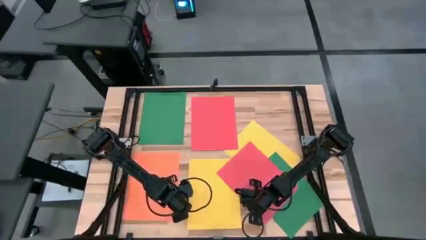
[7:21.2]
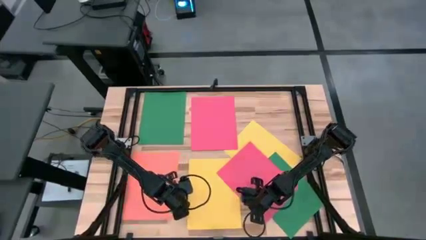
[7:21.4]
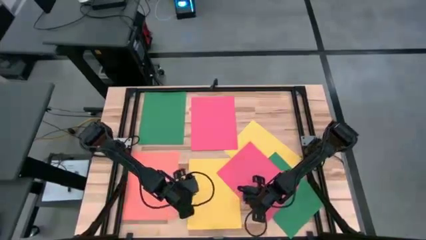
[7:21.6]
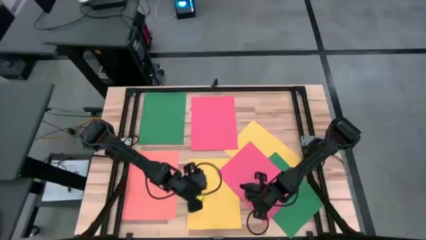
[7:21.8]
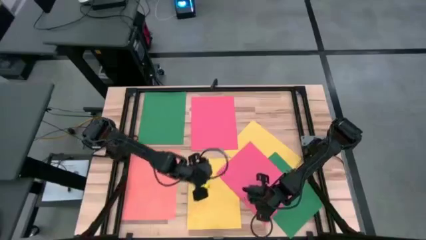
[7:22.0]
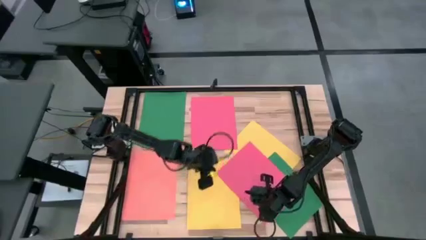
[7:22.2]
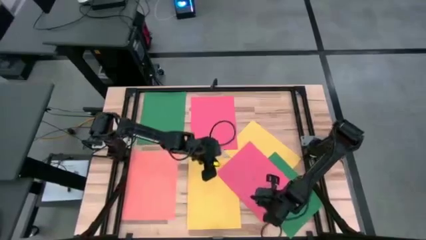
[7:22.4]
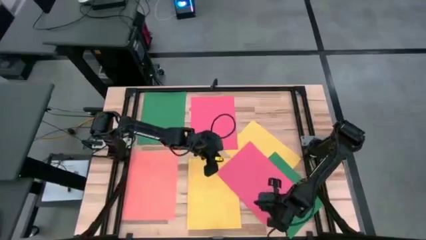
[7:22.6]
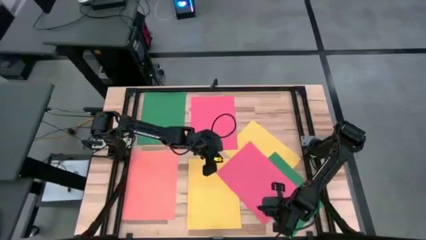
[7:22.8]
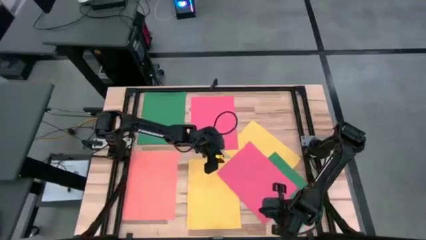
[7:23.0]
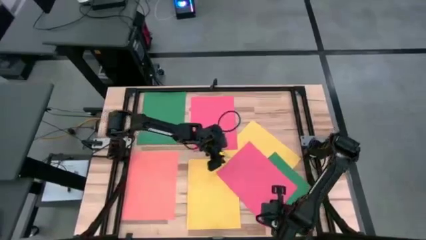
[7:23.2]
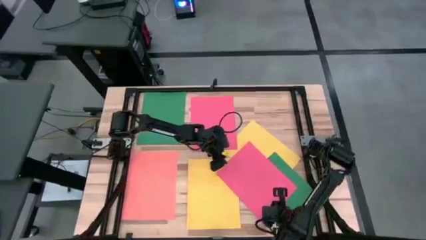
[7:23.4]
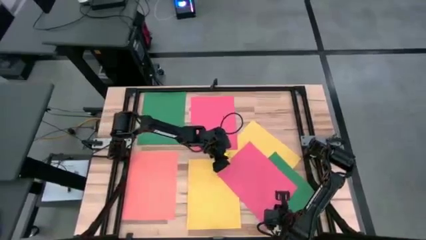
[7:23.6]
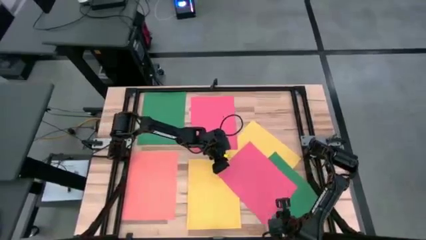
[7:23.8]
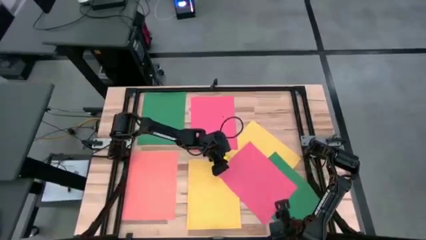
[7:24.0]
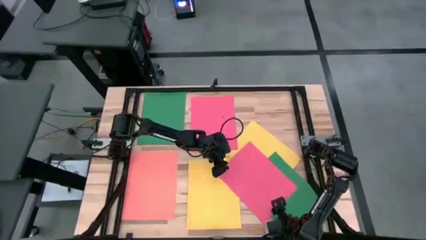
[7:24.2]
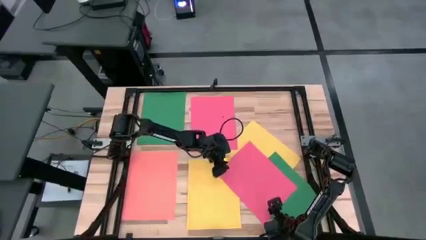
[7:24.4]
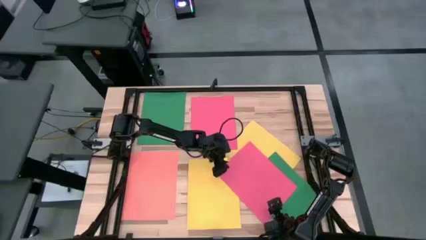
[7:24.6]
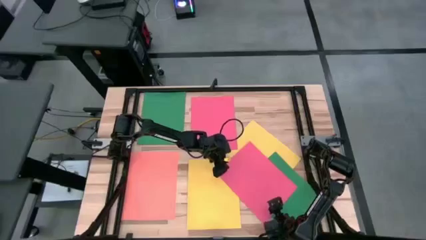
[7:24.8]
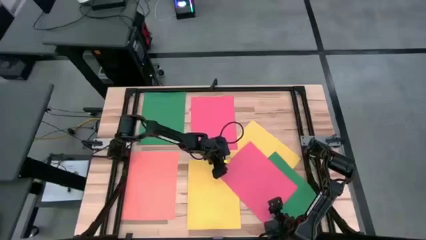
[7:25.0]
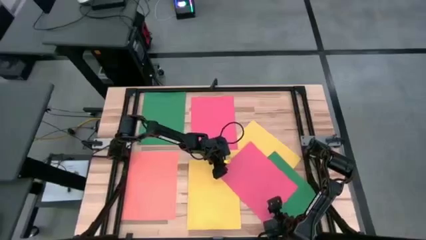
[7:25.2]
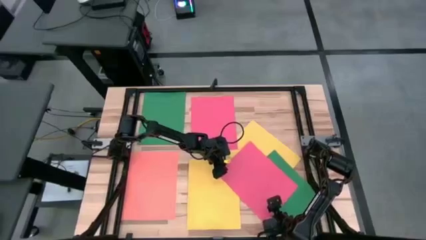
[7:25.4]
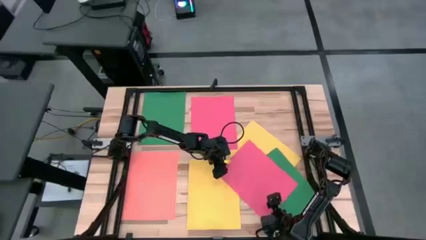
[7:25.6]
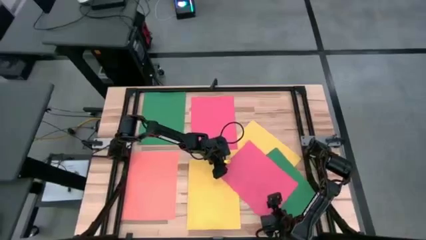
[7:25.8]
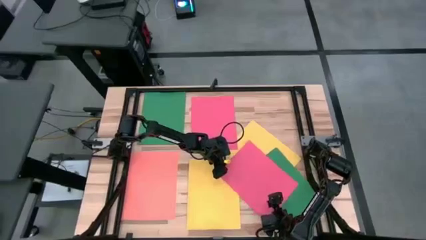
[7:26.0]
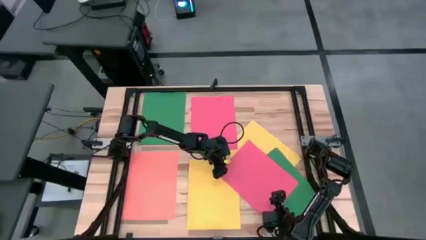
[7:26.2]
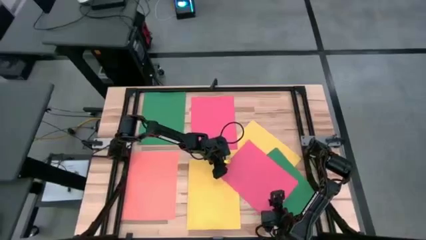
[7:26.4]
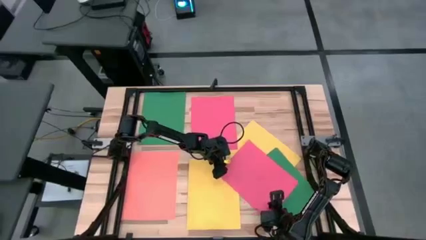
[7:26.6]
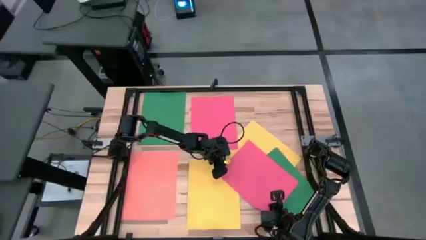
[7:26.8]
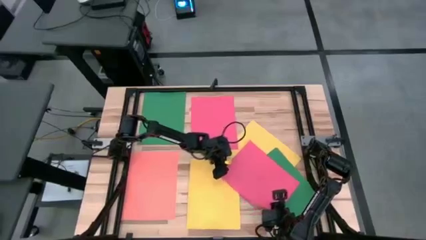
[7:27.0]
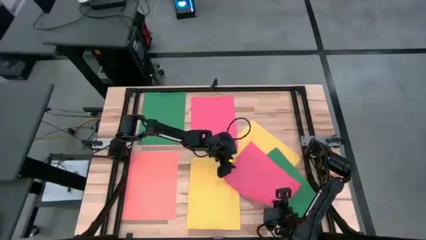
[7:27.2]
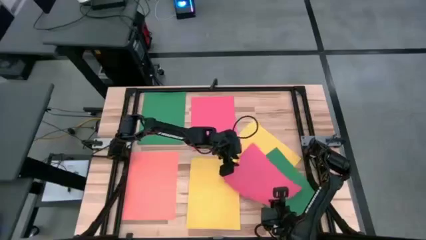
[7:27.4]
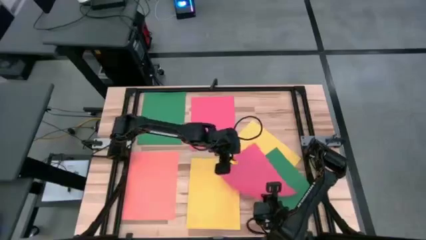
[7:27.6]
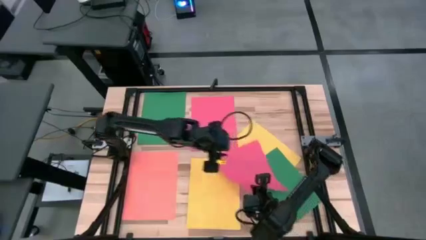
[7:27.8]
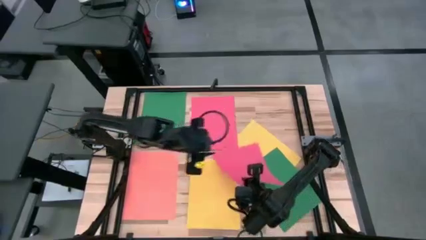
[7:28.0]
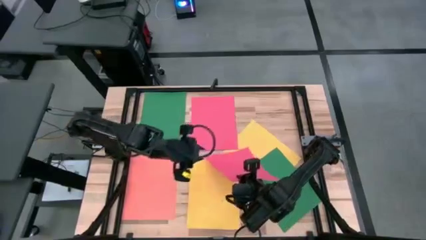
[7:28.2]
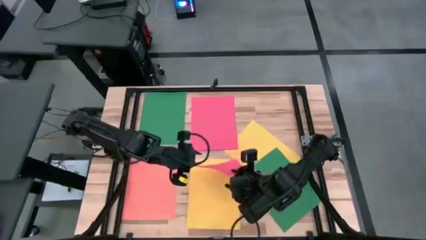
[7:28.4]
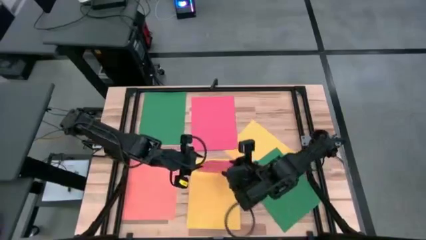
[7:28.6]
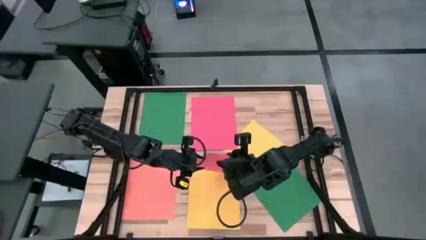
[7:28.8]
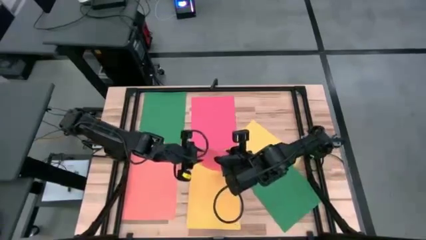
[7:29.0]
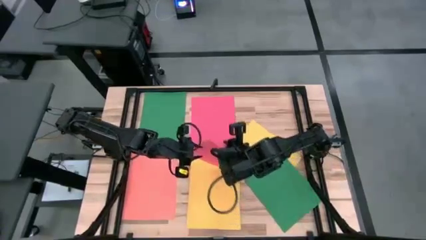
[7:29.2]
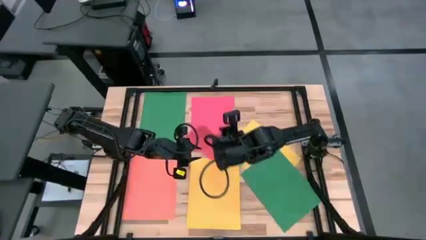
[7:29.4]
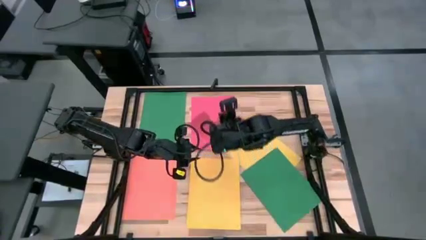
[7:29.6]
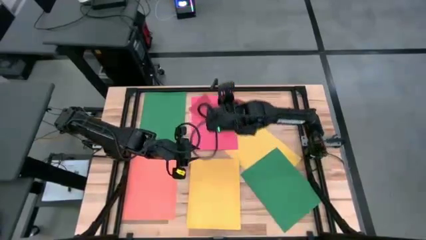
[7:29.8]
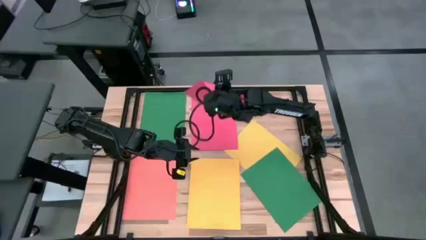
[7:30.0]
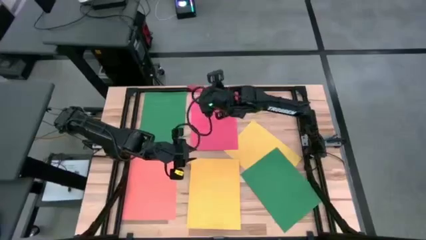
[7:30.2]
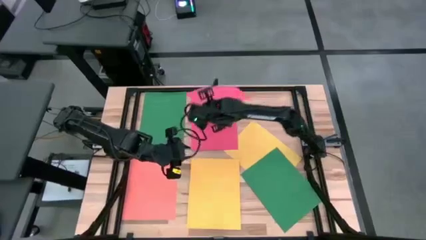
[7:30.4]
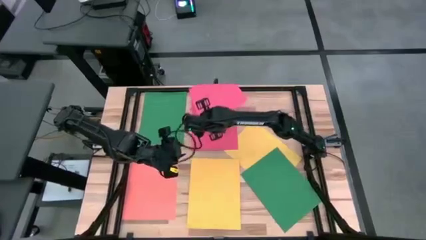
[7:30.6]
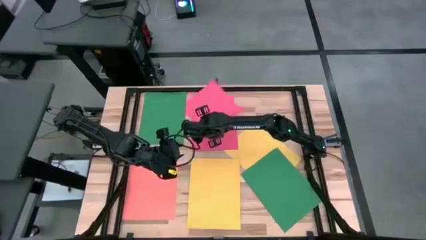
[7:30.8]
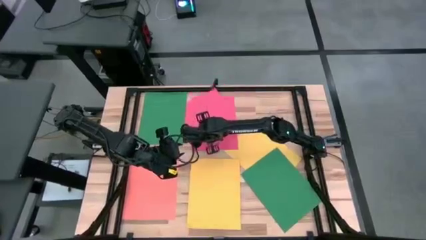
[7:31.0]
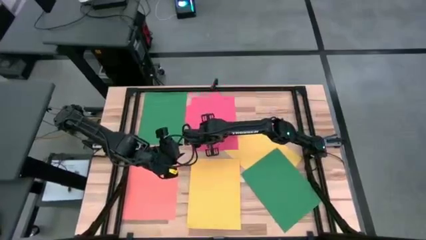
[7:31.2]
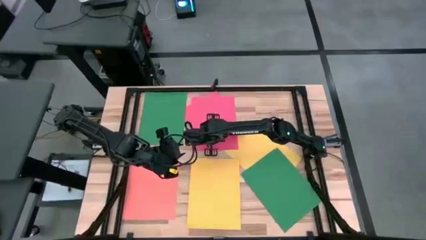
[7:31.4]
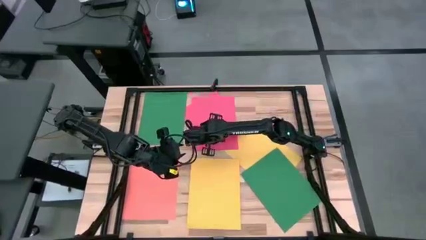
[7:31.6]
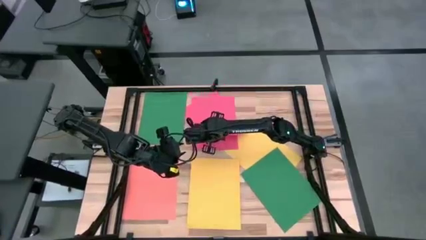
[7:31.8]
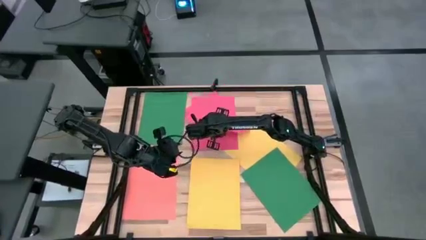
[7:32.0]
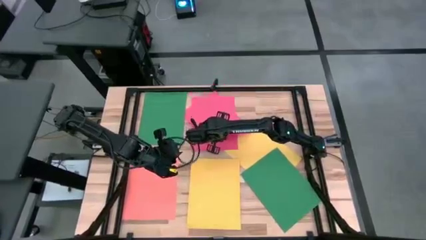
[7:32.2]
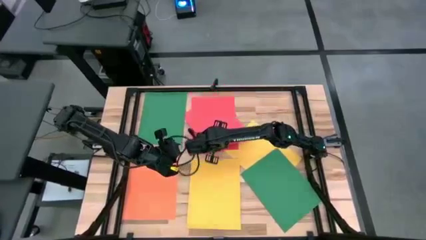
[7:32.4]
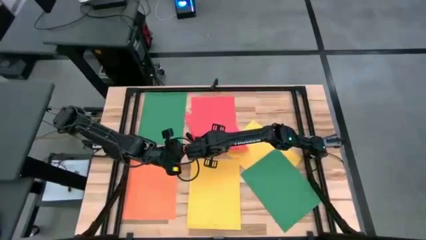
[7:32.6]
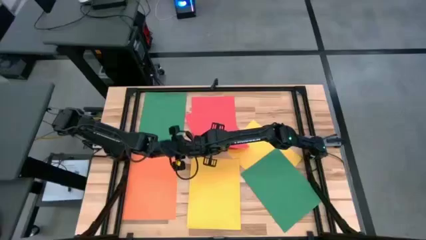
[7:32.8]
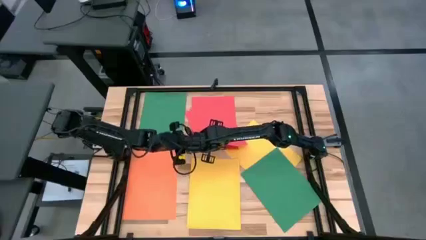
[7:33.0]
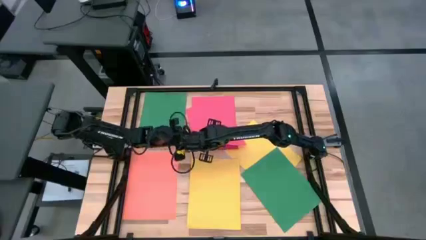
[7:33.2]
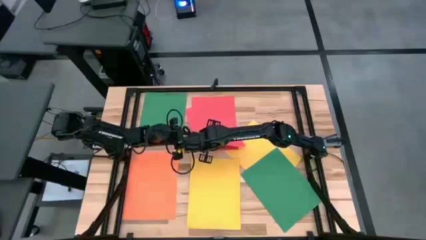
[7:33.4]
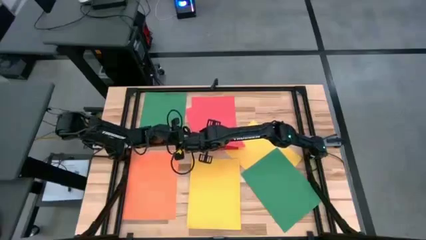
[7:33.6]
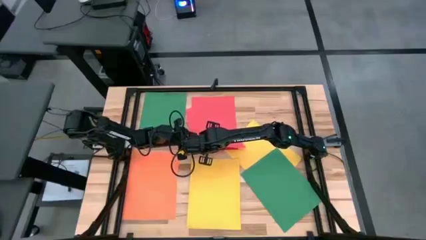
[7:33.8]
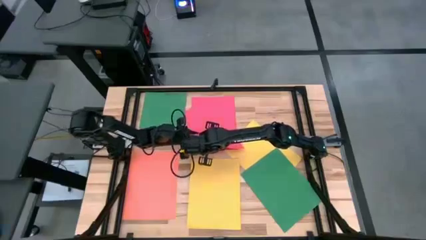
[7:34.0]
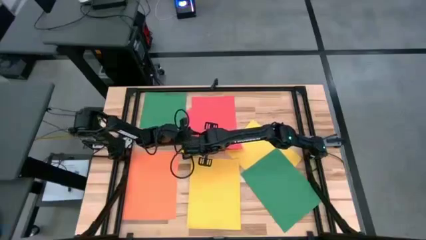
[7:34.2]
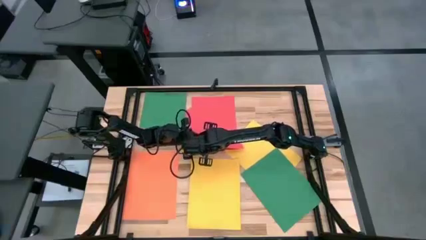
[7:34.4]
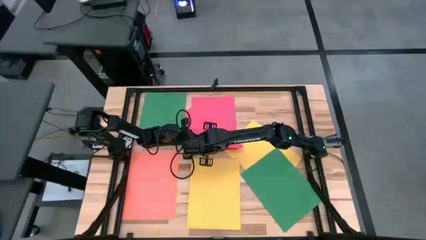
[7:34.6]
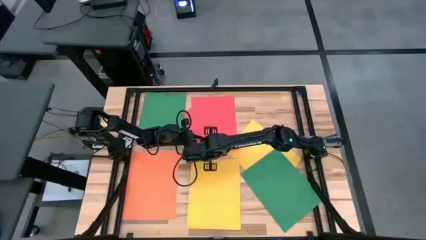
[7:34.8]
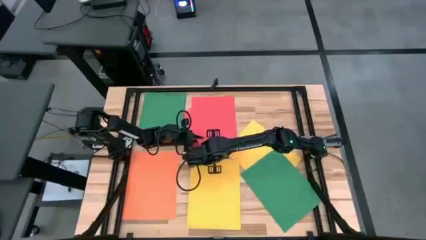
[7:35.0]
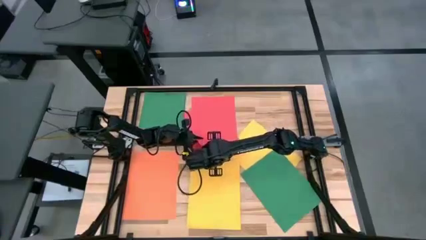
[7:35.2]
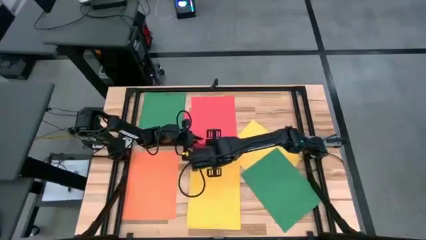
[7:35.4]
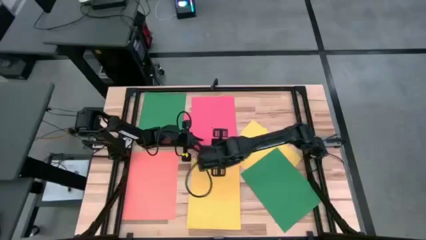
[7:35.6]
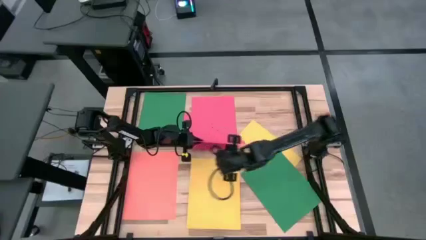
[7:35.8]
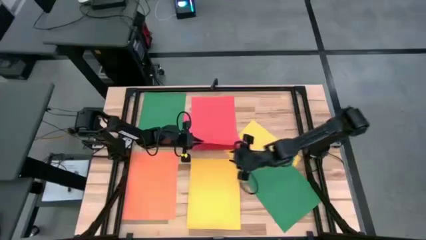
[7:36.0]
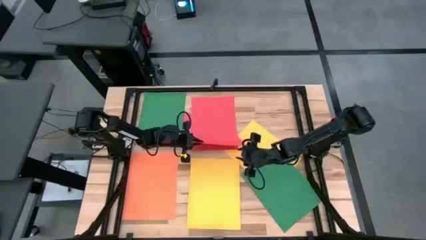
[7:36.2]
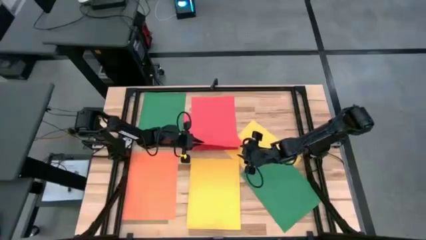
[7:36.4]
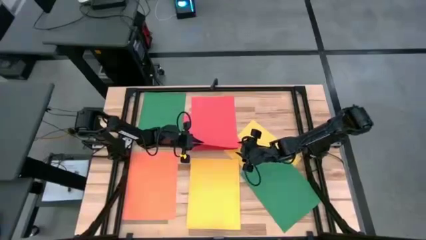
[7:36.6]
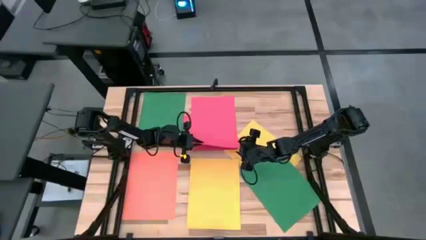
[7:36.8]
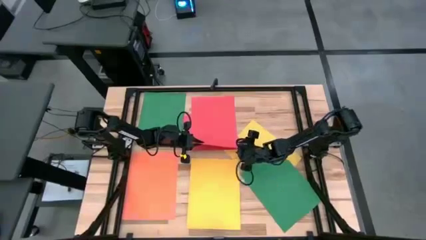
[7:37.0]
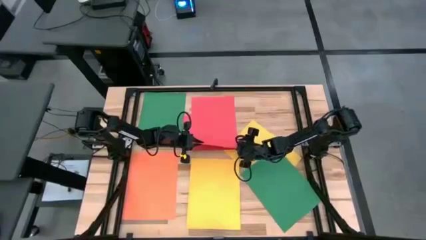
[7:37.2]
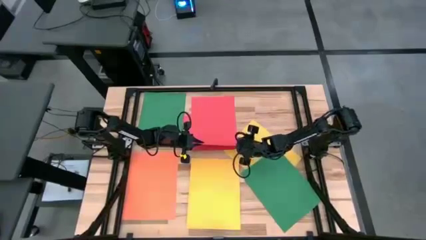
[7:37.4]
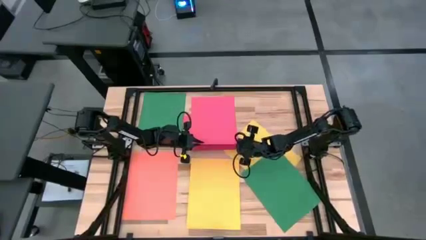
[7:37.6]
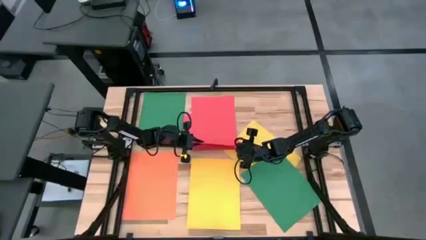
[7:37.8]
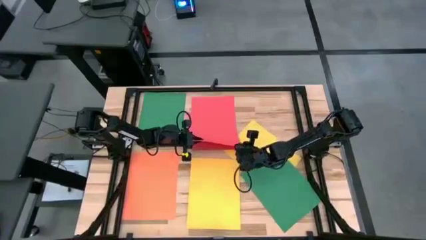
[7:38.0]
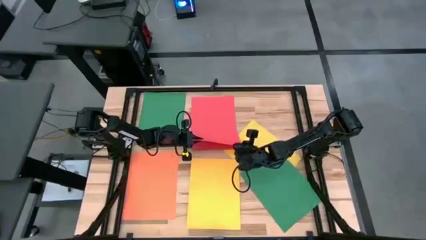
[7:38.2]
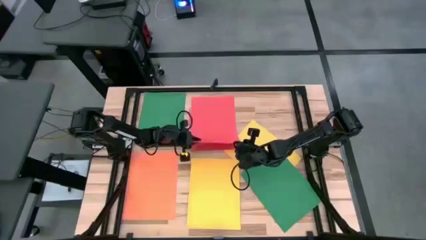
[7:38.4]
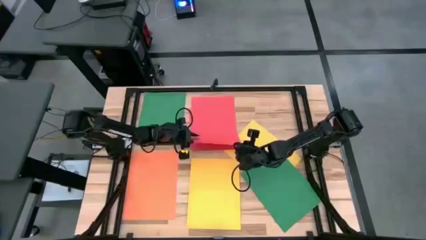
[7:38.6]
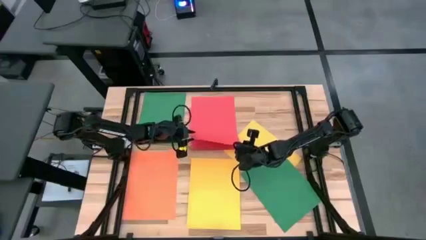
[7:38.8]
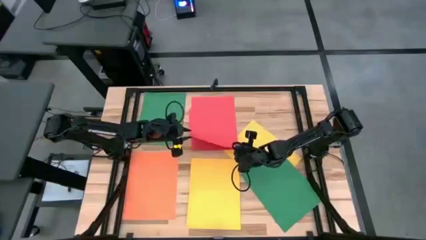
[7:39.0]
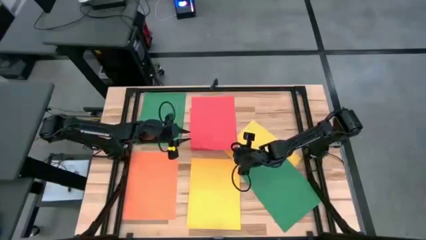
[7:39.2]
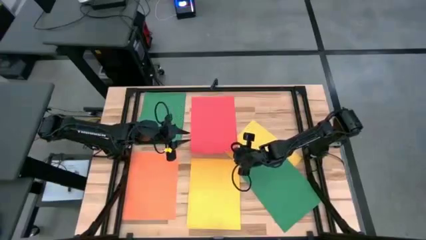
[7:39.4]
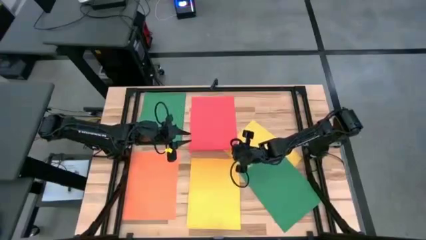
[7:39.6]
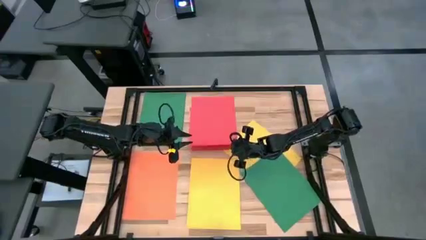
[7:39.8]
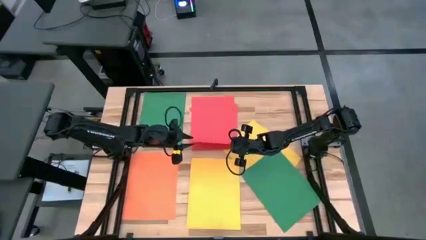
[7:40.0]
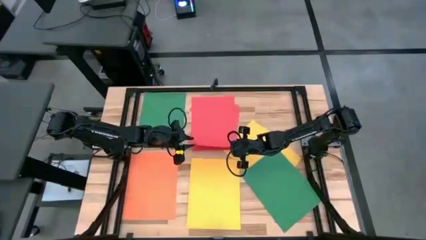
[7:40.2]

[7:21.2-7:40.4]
Task: Organize paper
Stack the pink paper on top of the pink paper
